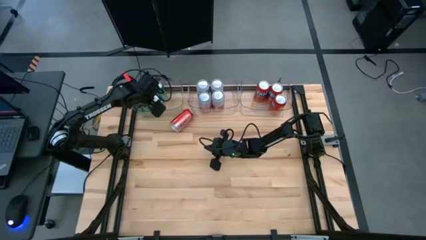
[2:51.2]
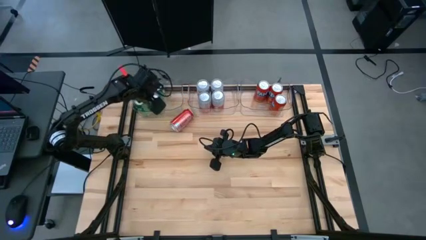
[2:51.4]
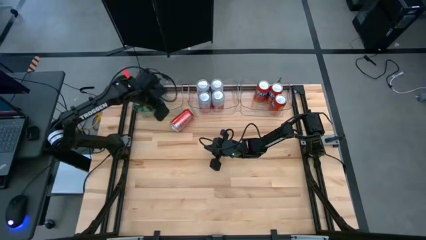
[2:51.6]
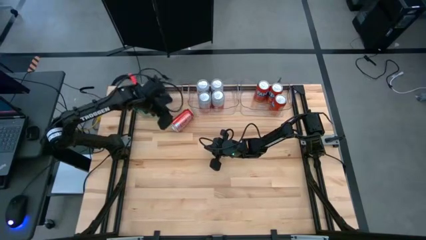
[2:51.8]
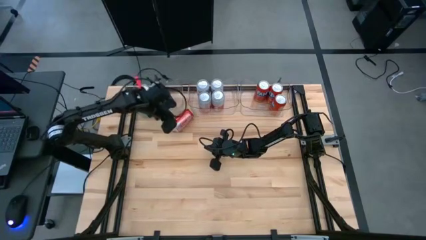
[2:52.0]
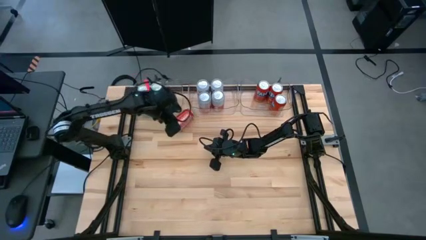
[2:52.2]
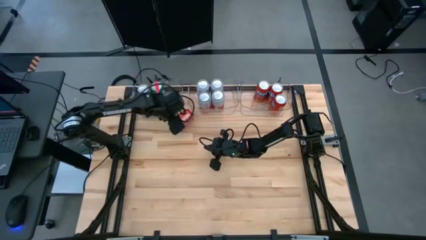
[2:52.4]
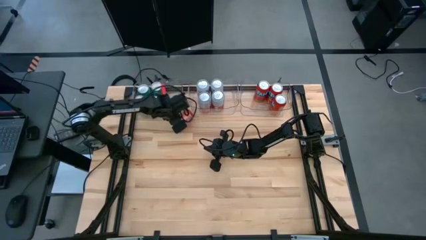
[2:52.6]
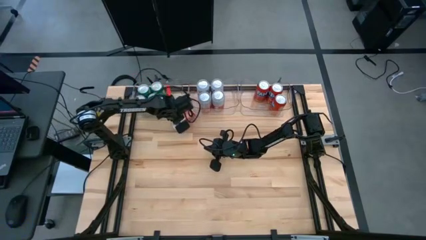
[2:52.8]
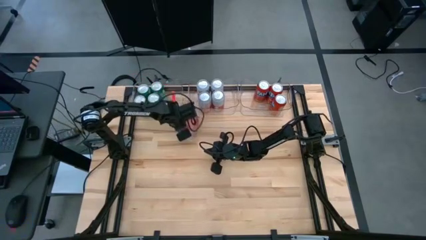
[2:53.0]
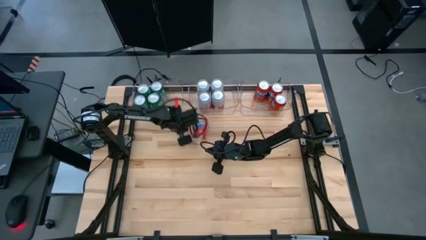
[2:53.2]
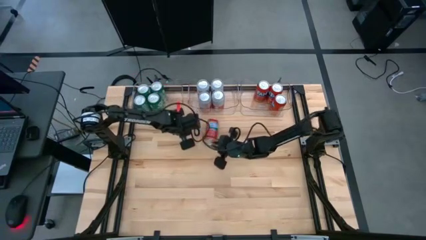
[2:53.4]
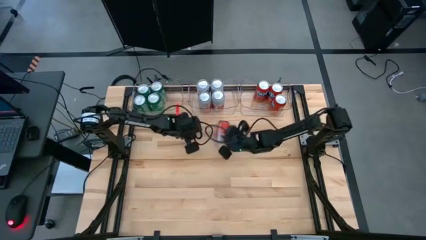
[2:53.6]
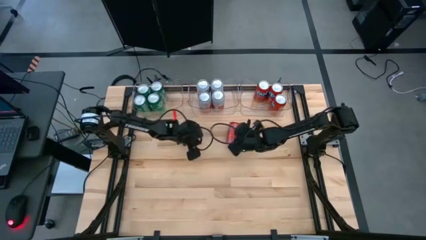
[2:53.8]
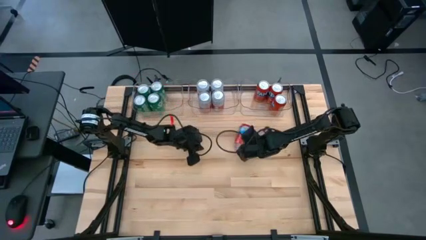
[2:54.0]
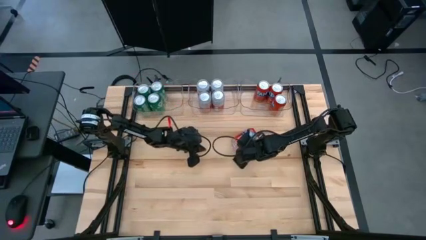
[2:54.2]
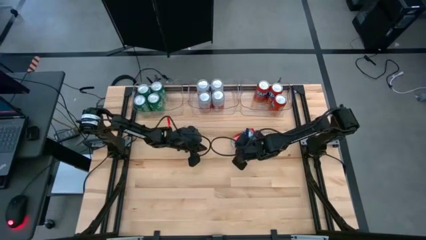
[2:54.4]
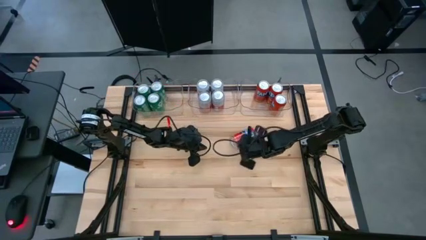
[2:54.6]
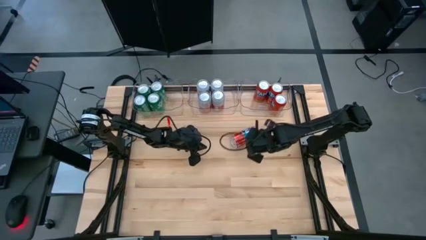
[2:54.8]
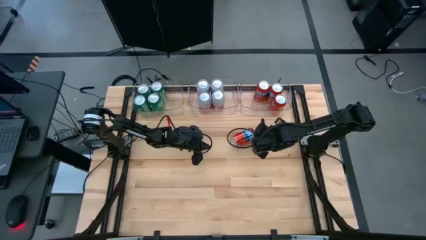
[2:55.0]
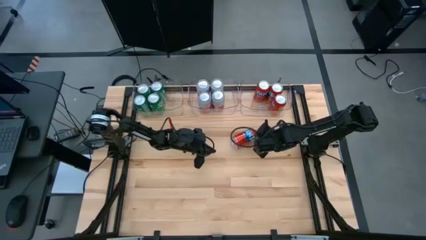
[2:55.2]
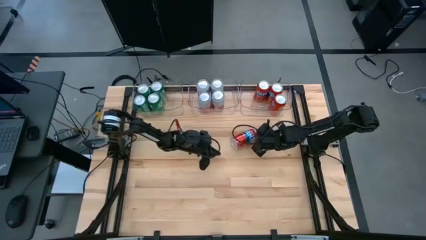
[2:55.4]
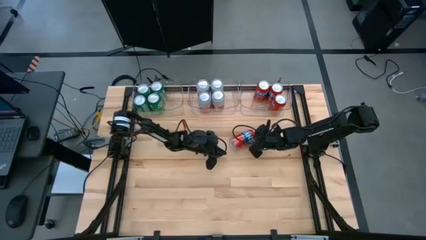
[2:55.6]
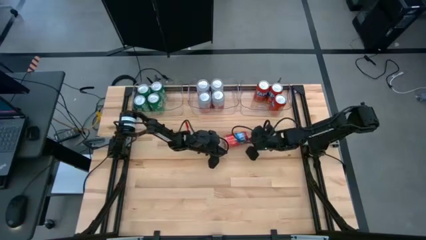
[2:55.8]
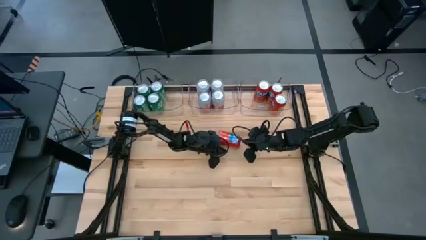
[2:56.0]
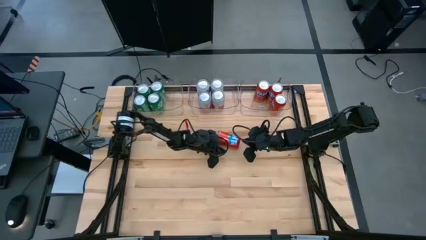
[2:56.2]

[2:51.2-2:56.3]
Task: Sort soda cans
Put the red soda can into the top right transparent bin

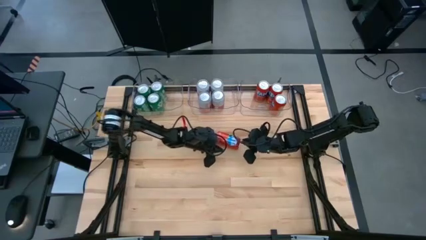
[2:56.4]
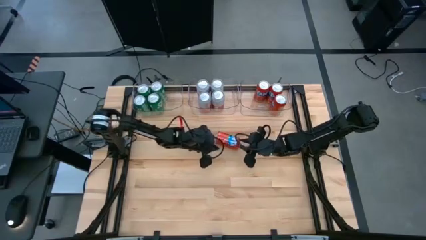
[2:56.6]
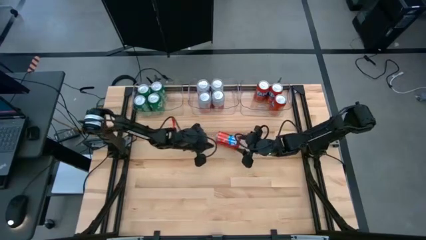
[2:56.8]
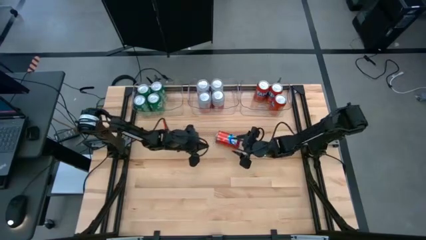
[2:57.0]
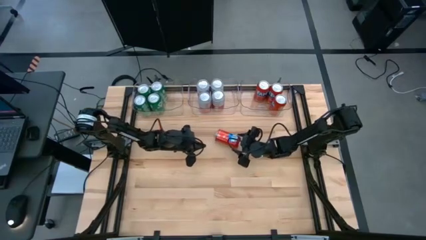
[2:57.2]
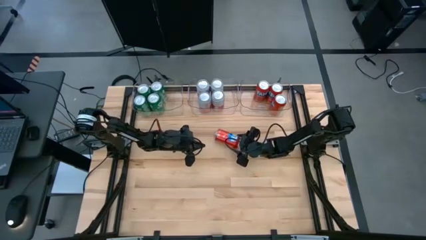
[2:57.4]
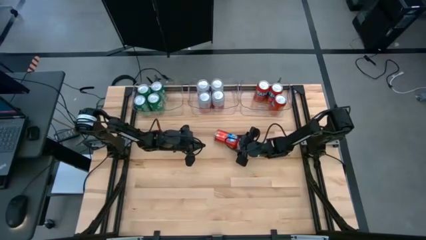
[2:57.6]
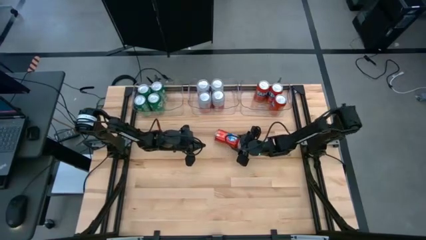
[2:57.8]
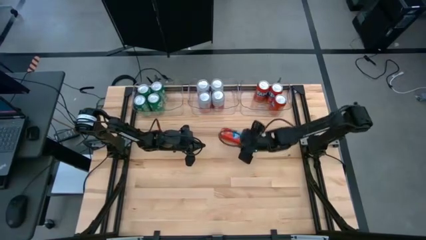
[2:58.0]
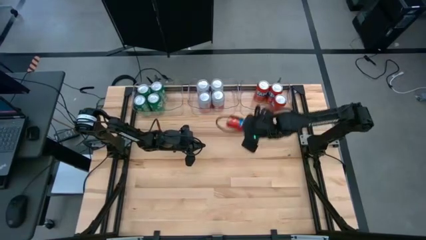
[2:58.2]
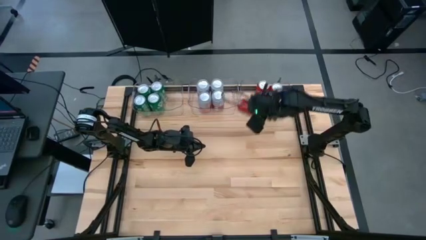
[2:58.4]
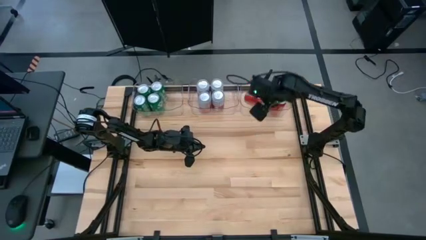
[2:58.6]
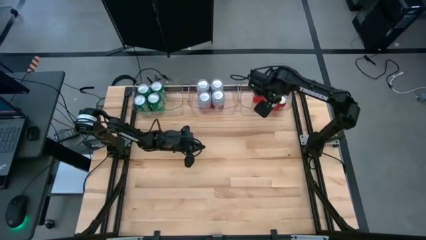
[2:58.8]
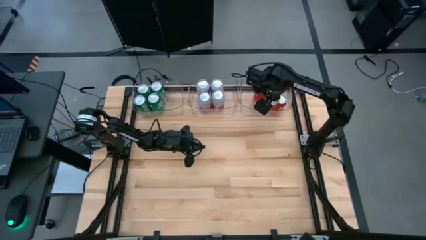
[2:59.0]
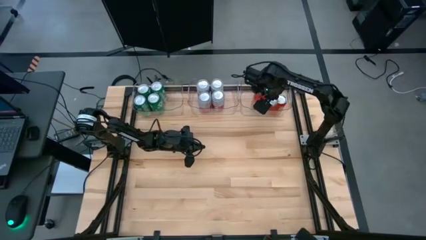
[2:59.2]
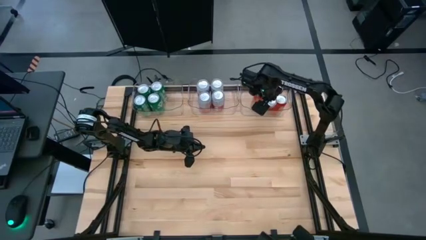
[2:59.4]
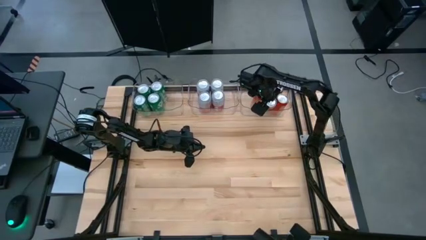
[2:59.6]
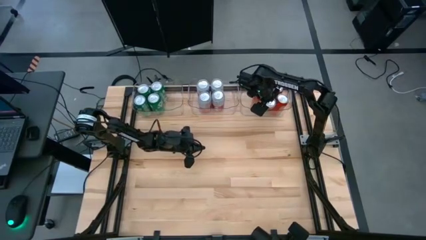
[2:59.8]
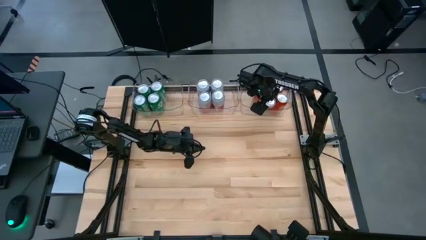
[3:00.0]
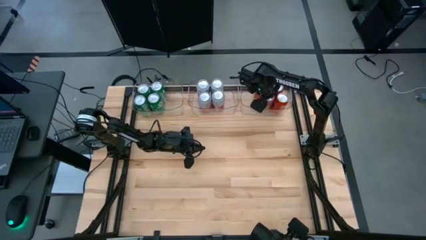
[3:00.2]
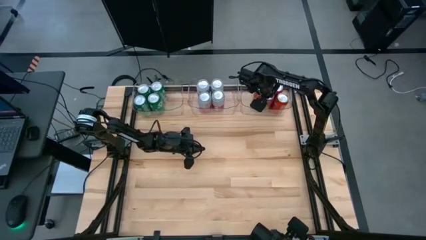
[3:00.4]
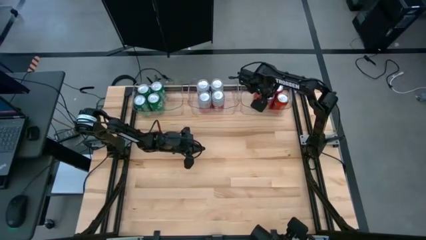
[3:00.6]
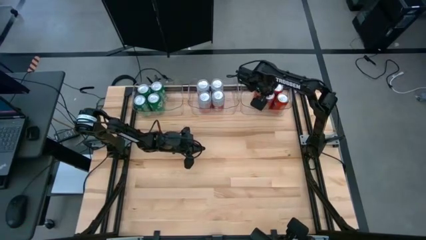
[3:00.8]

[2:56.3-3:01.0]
Put the red soda can into the top right transparent bin

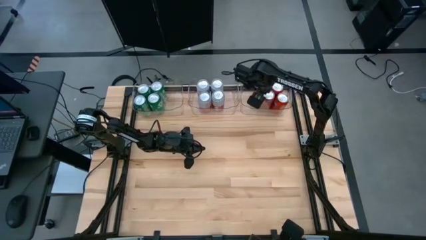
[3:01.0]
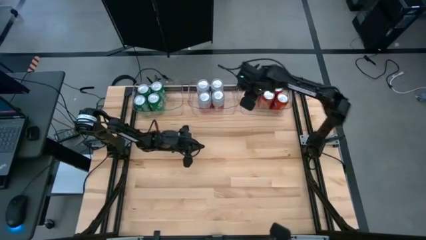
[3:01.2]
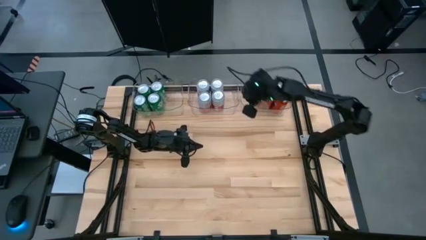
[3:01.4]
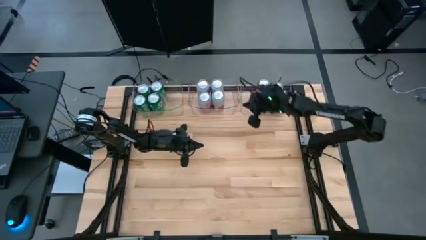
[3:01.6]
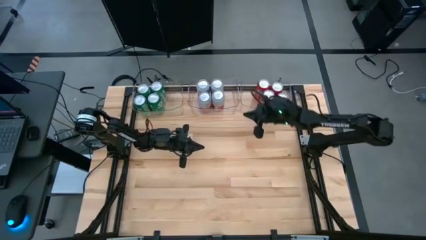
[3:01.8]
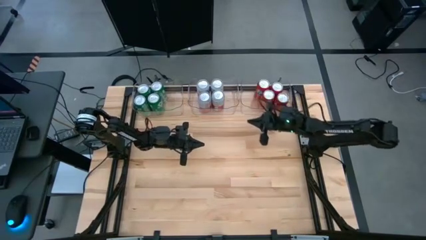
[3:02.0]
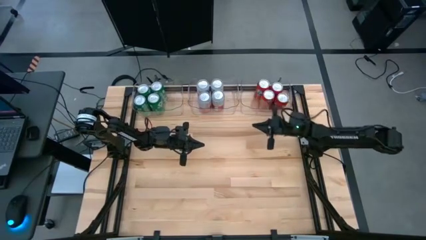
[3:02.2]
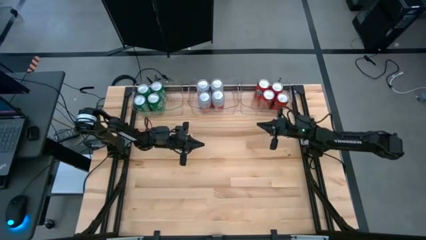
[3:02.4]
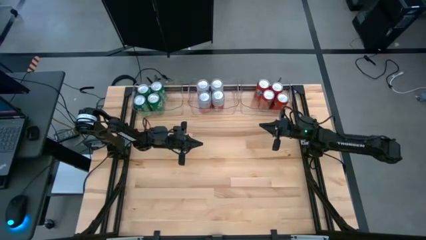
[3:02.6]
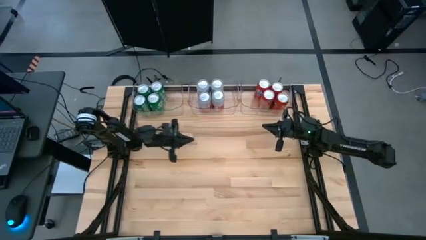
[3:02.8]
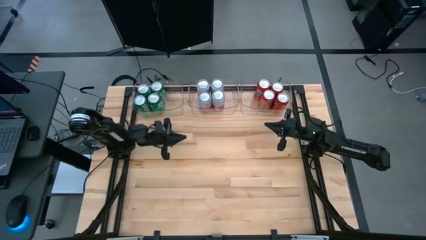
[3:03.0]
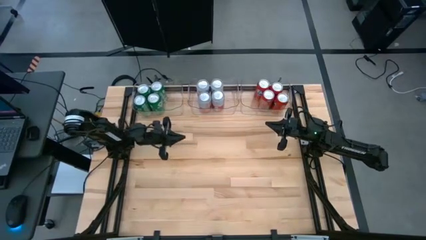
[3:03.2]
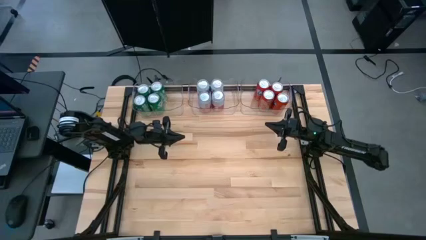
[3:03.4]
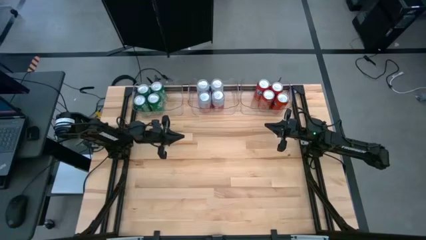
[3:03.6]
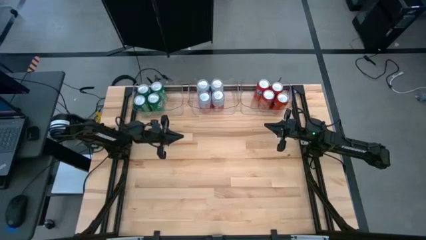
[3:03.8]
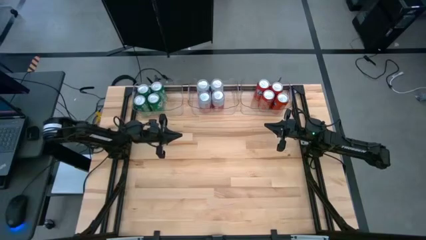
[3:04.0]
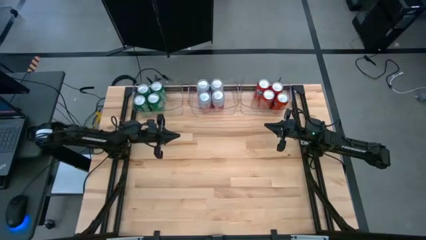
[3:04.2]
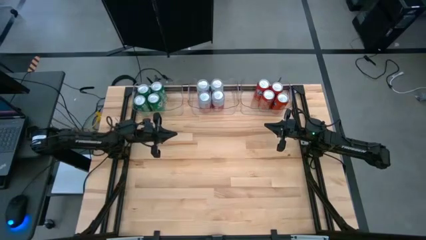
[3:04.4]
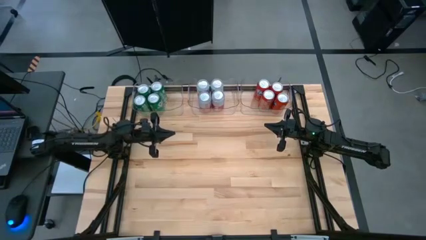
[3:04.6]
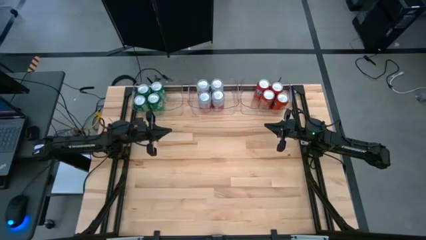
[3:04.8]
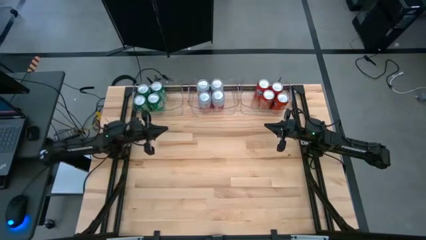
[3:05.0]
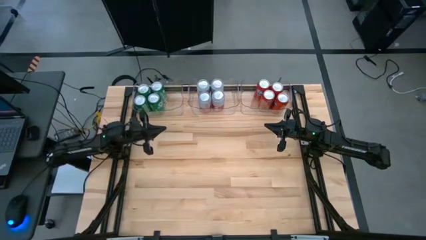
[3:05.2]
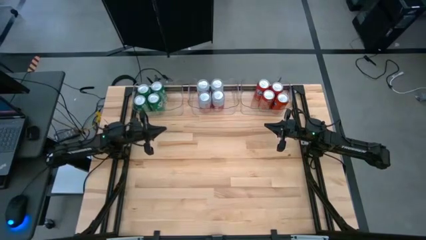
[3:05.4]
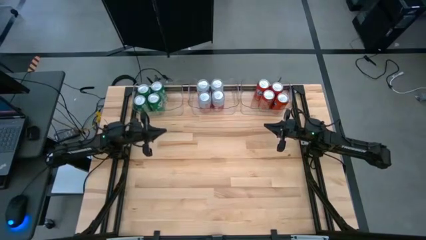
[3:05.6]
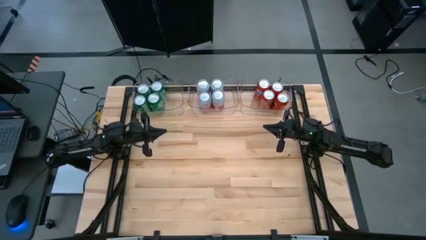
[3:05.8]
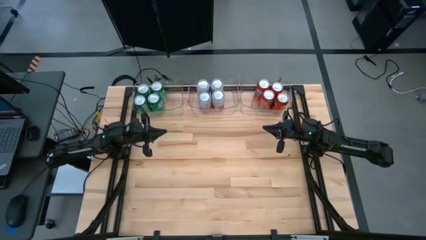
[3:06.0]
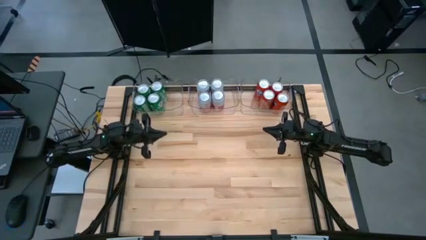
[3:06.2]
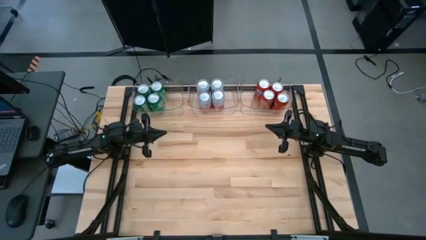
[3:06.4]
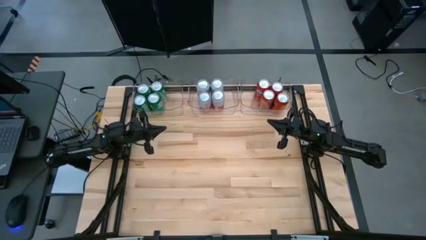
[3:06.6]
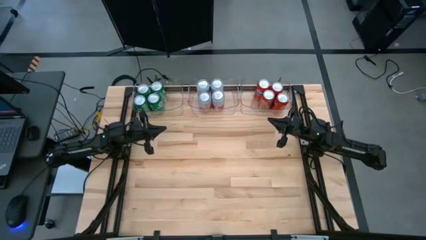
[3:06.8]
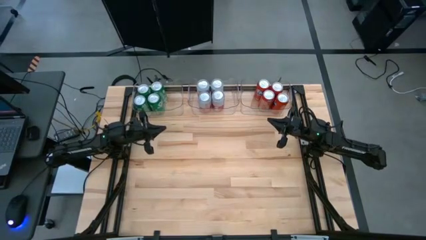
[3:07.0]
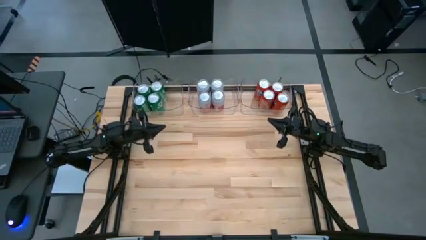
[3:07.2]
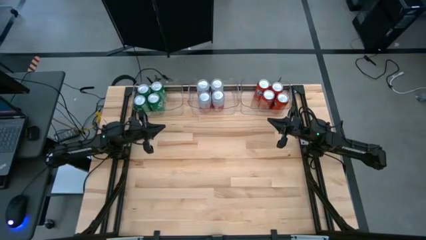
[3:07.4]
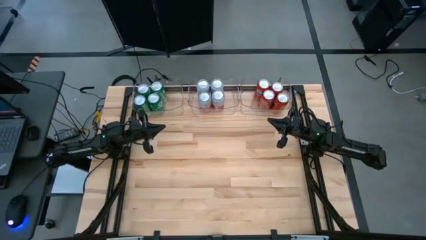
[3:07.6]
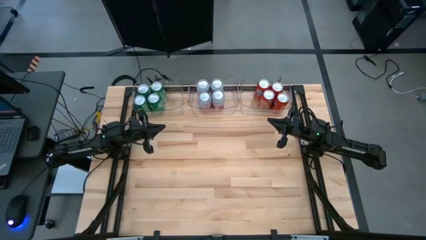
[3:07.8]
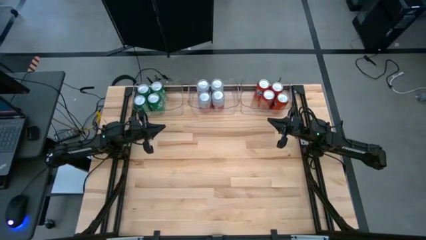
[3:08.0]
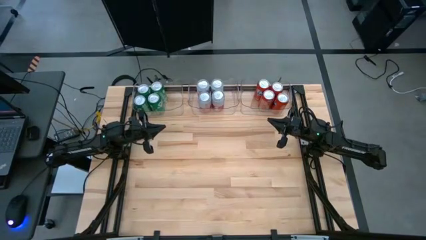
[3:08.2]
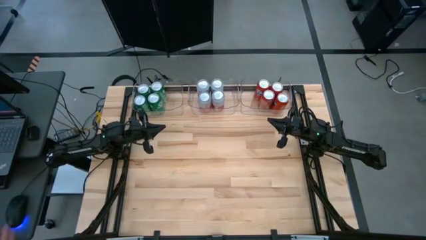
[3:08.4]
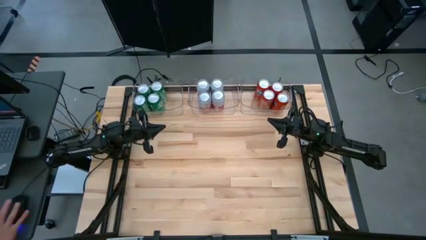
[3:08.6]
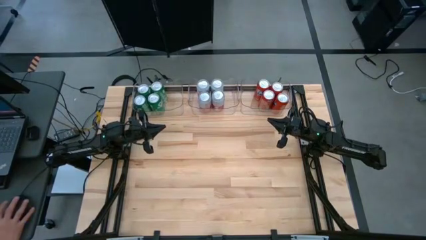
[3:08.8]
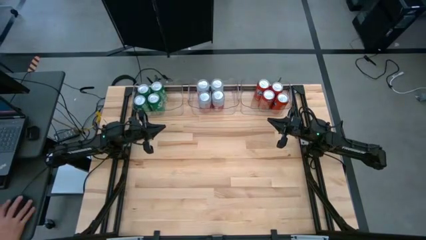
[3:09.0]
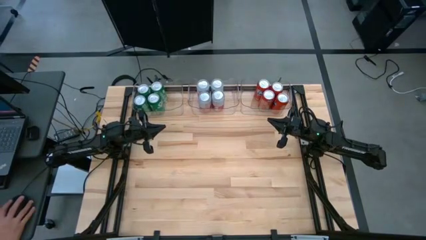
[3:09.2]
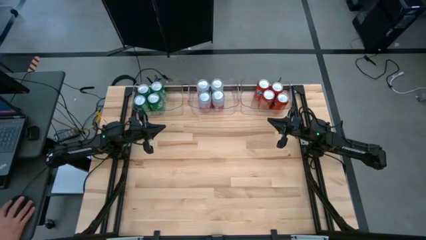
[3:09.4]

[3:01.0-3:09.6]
Return to Home Position
